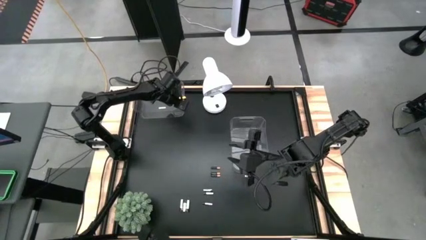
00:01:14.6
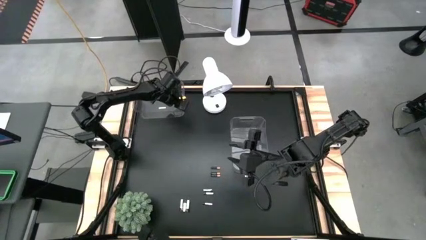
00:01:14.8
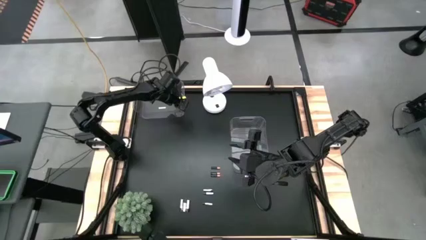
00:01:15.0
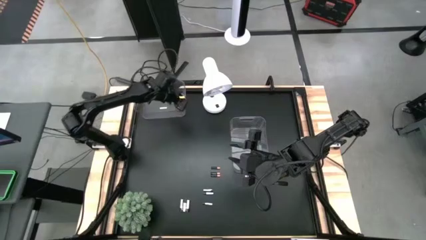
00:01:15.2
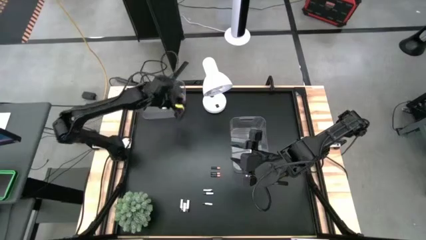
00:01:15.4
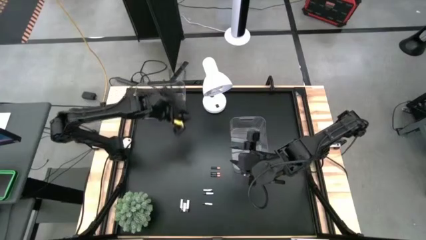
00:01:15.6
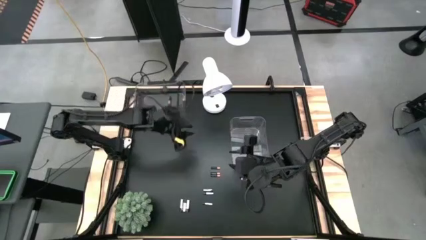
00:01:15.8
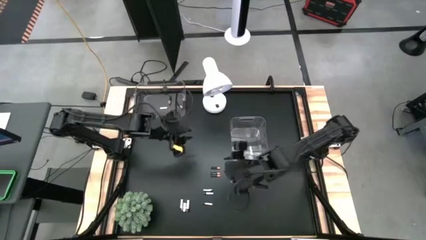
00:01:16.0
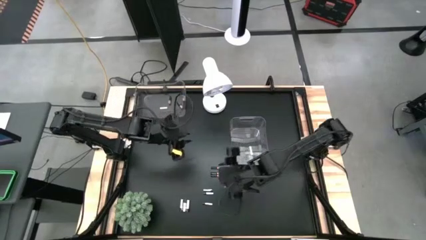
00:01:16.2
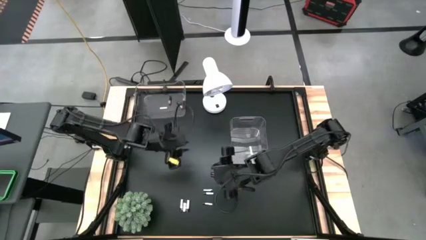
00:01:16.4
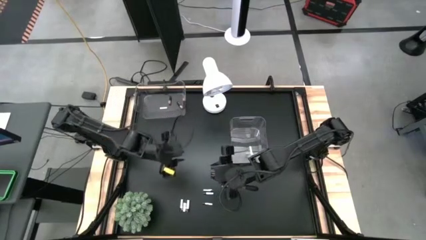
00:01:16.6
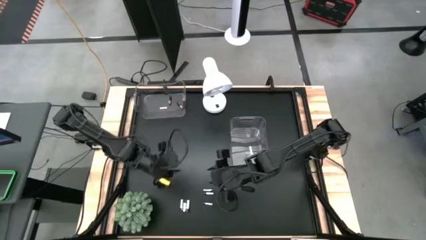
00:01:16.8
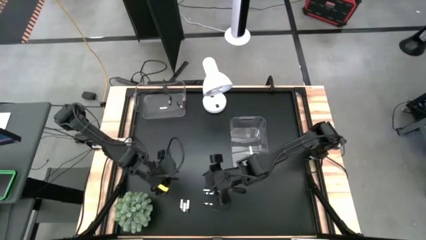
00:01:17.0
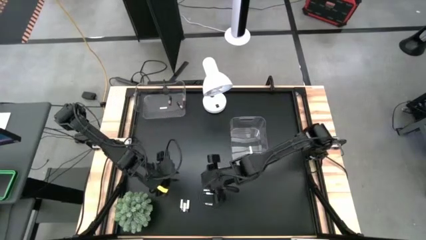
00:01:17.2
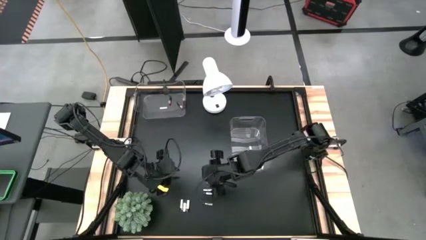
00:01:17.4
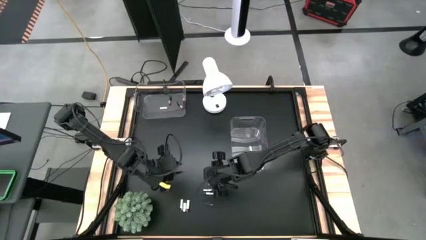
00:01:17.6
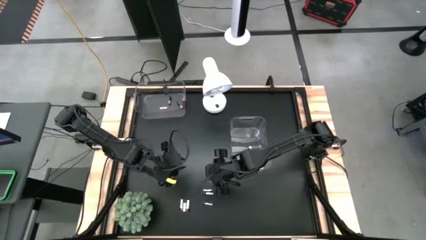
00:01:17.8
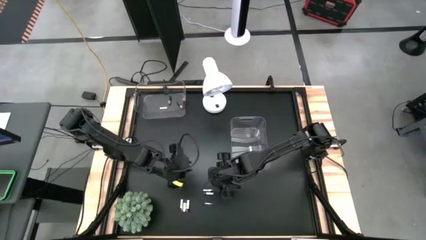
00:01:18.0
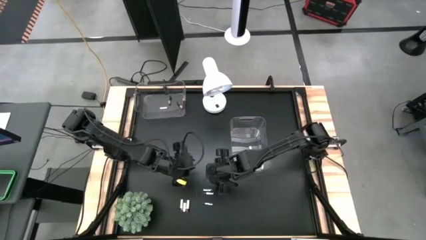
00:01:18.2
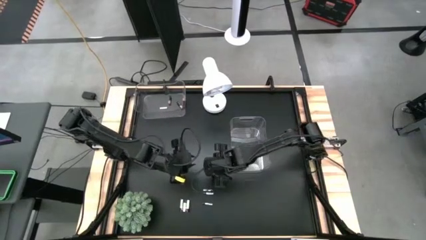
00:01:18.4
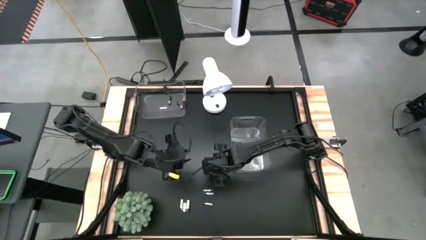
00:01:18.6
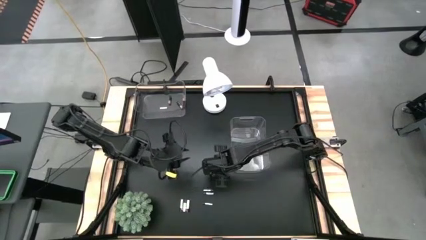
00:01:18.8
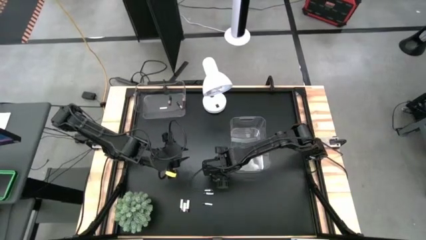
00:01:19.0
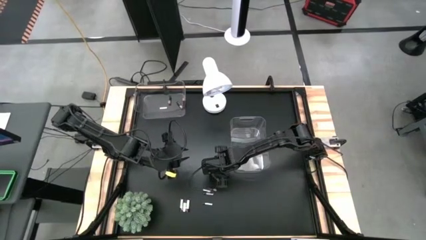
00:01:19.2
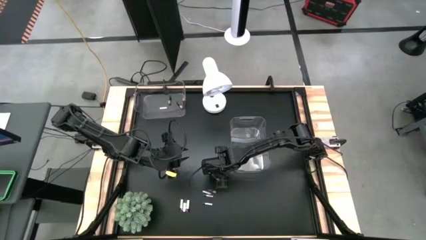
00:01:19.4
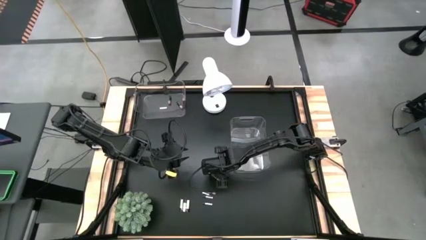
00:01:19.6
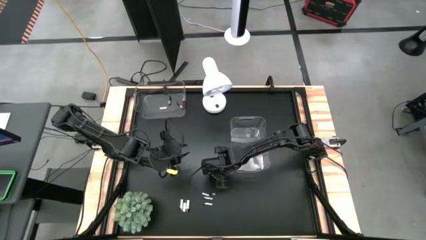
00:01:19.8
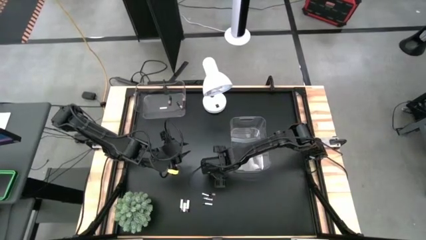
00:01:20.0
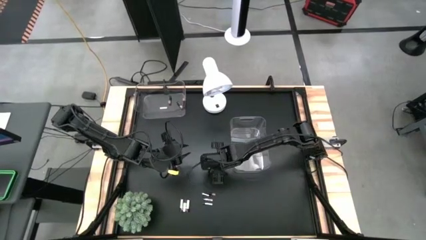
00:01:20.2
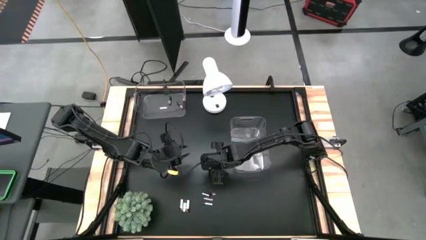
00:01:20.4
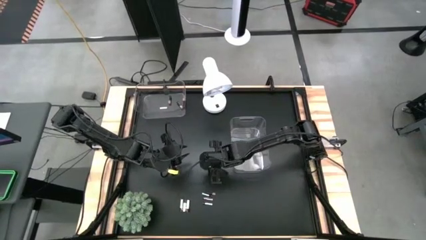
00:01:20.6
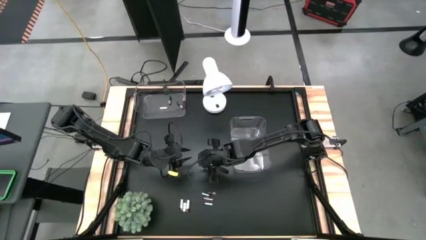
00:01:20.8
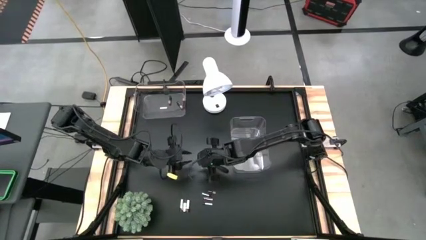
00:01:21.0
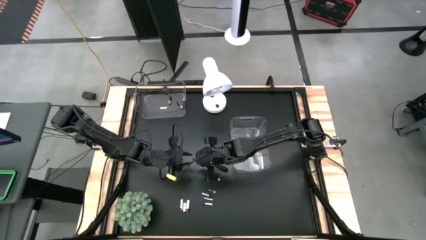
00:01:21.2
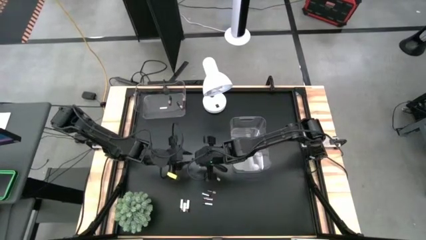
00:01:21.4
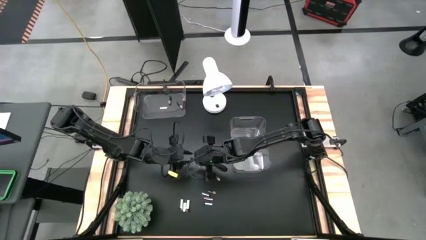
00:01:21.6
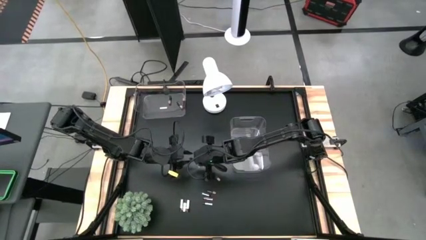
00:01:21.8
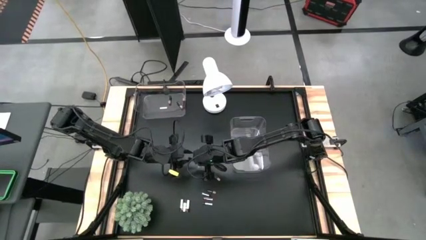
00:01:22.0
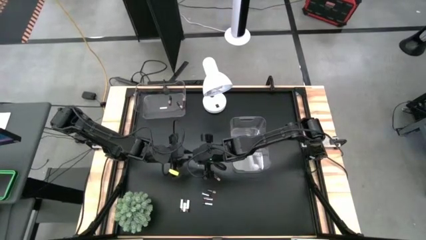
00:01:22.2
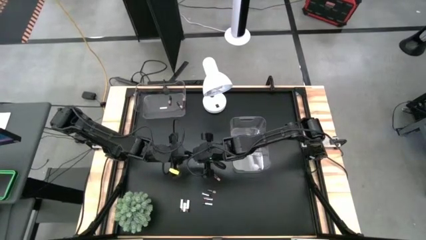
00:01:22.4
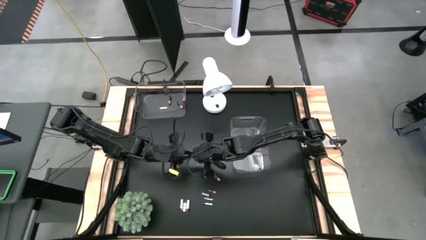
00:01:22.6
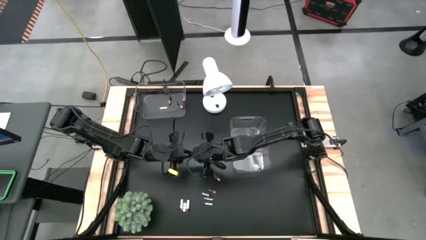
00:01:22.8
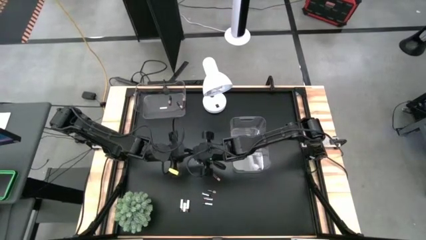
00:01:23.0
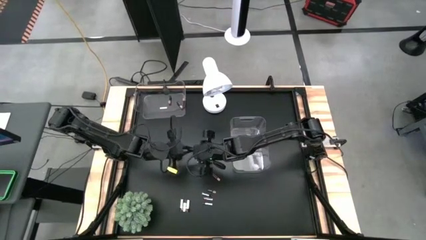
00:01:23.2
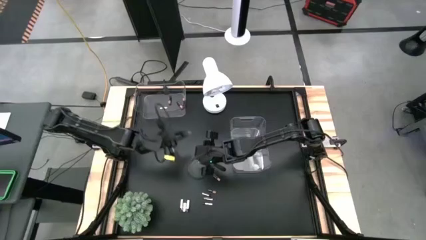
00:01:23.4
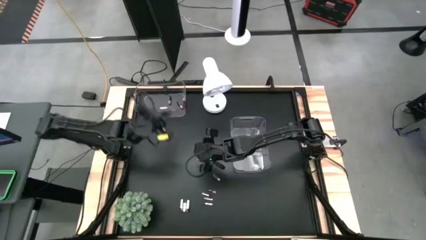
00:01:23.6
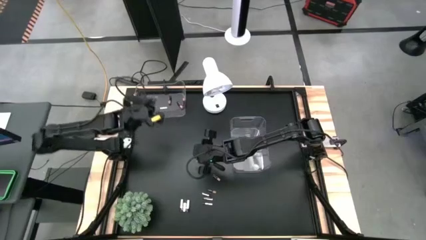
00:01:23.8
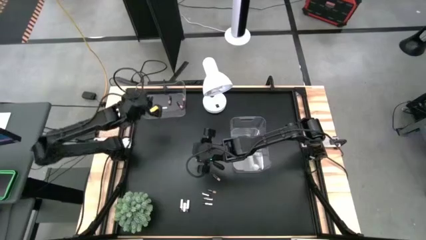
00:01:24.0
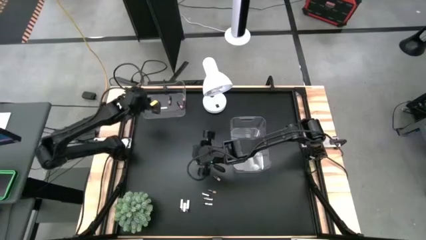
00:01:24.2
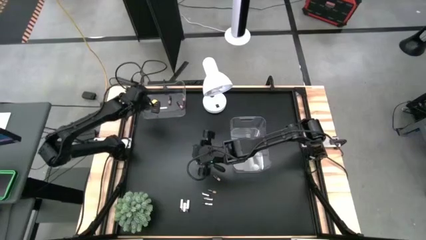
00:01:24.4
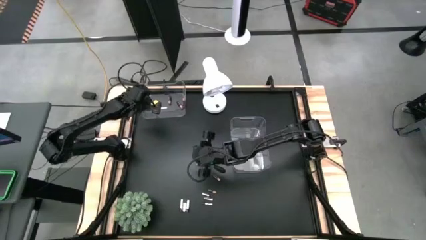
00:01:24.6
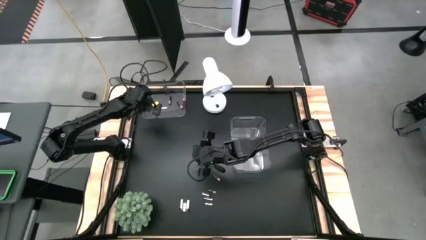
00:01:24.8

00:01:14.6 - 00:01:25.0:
Task: Sort batteries
Put the black battery into the top transparent bin
